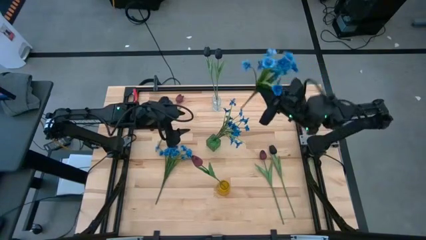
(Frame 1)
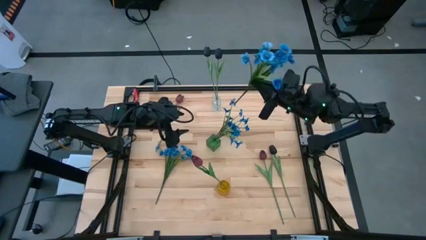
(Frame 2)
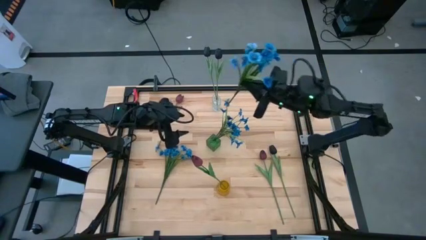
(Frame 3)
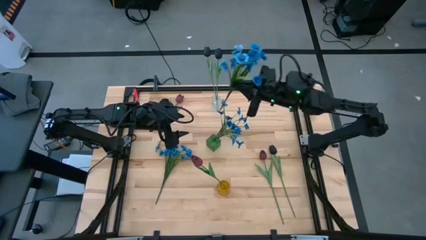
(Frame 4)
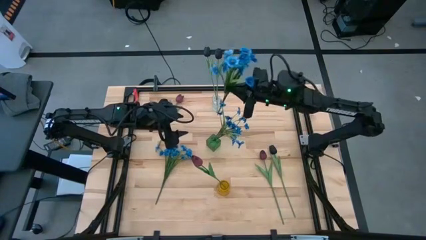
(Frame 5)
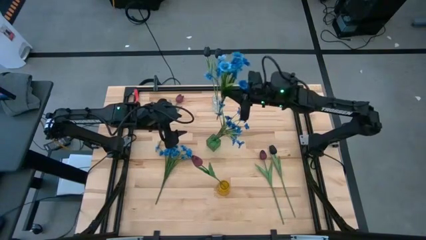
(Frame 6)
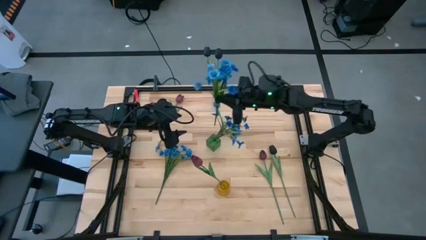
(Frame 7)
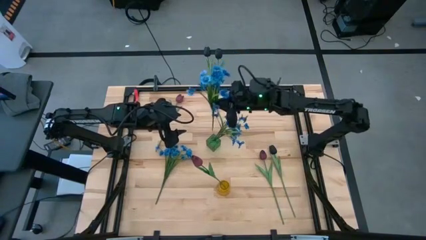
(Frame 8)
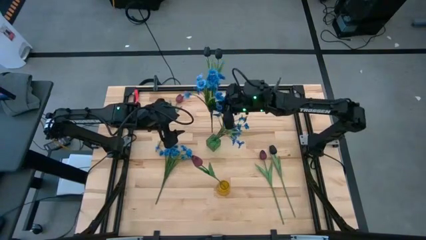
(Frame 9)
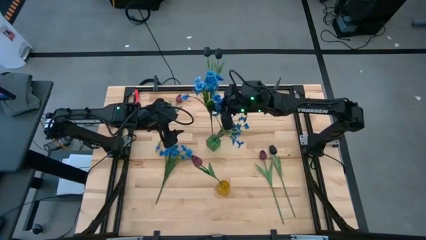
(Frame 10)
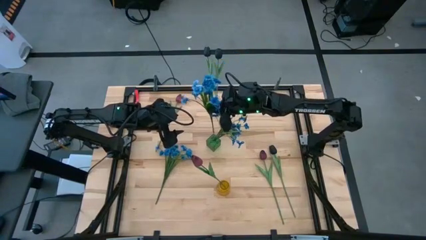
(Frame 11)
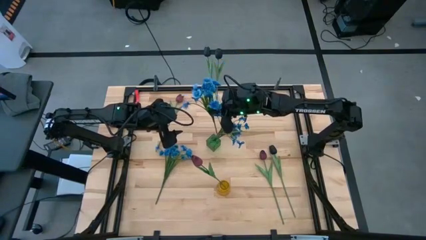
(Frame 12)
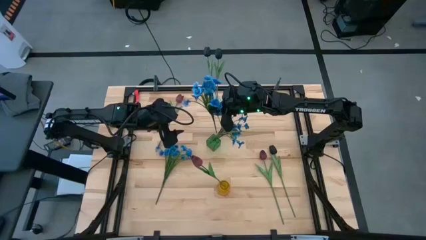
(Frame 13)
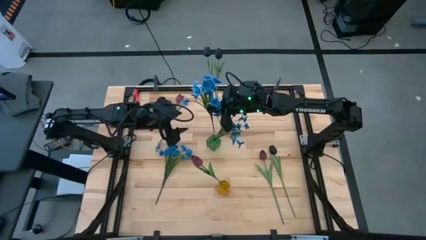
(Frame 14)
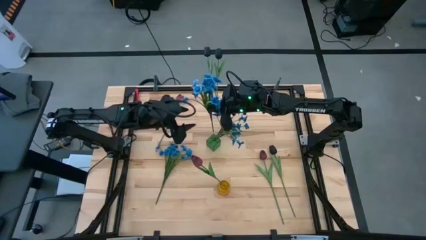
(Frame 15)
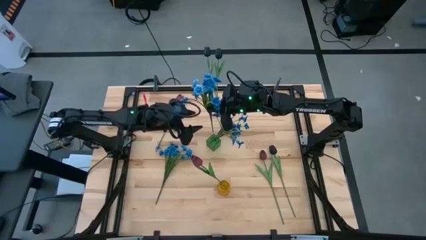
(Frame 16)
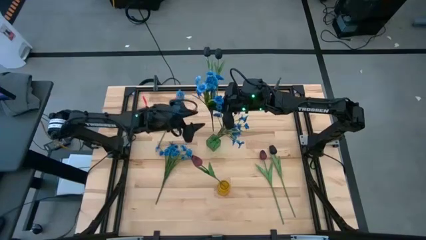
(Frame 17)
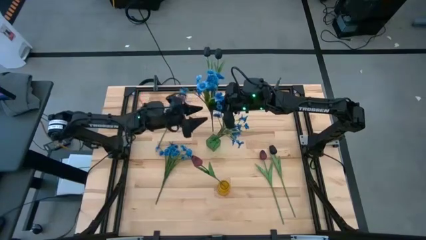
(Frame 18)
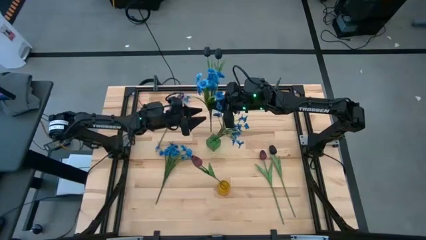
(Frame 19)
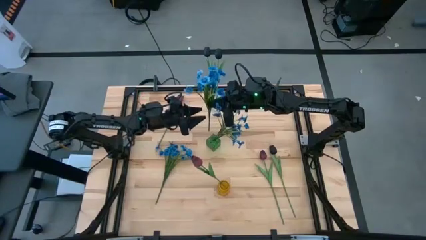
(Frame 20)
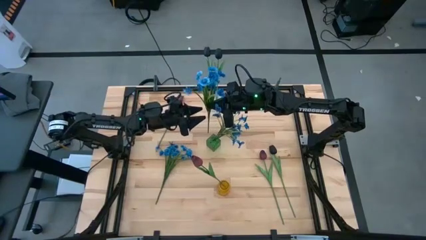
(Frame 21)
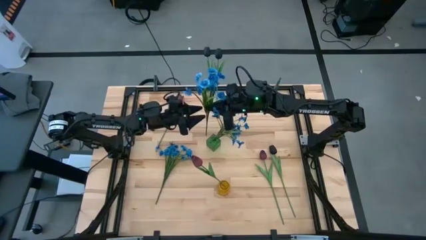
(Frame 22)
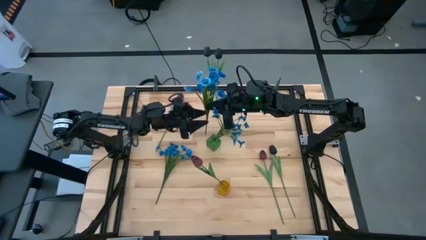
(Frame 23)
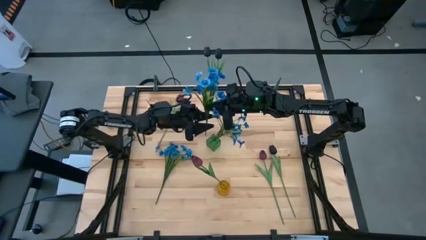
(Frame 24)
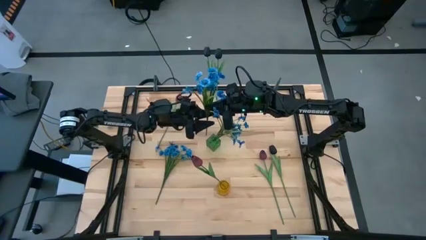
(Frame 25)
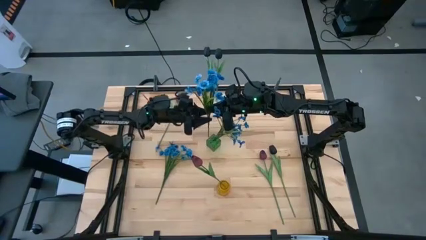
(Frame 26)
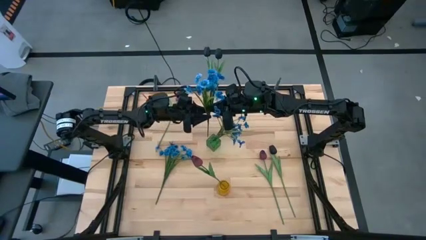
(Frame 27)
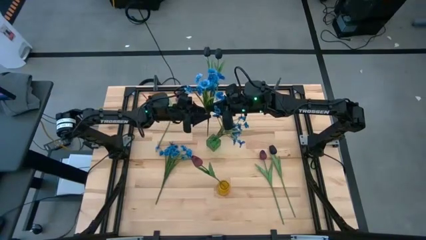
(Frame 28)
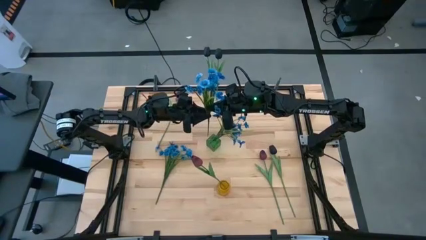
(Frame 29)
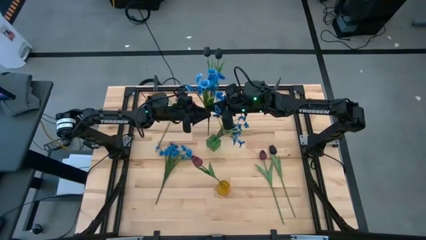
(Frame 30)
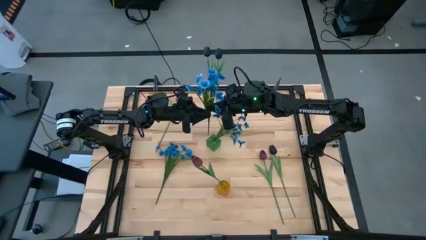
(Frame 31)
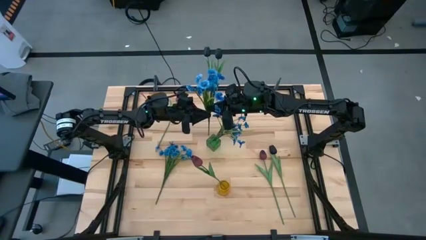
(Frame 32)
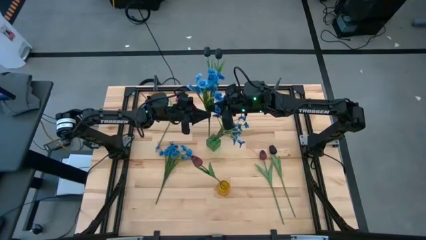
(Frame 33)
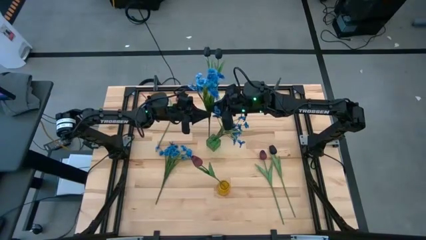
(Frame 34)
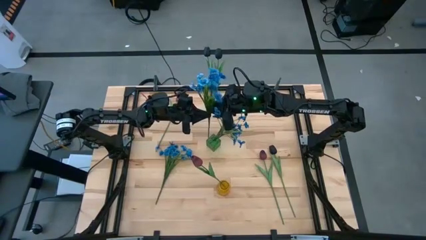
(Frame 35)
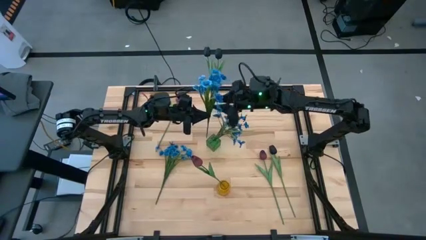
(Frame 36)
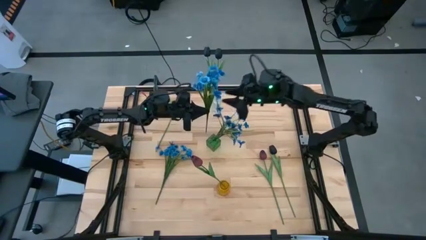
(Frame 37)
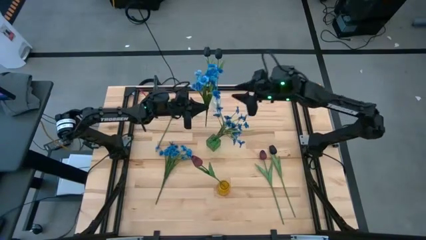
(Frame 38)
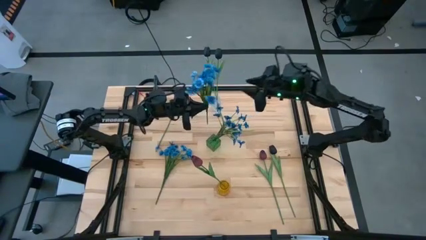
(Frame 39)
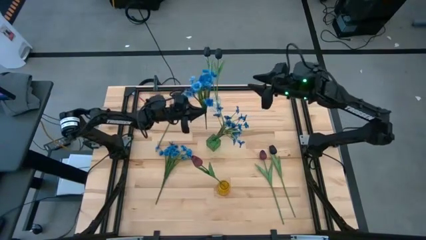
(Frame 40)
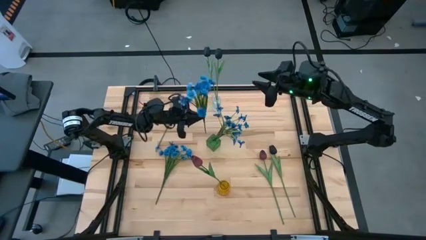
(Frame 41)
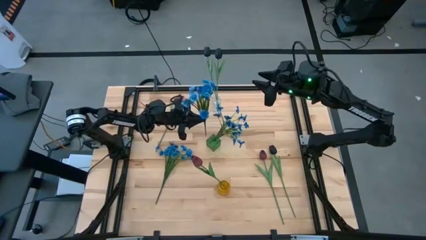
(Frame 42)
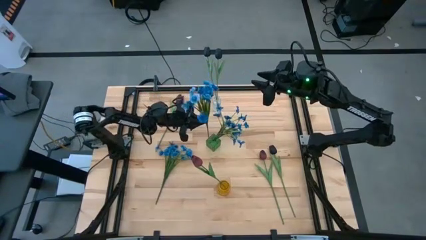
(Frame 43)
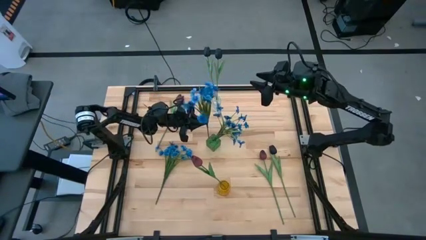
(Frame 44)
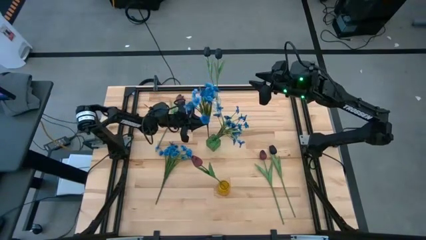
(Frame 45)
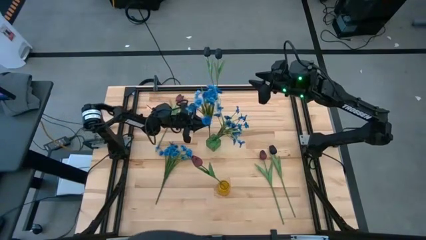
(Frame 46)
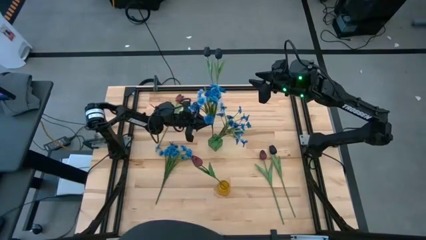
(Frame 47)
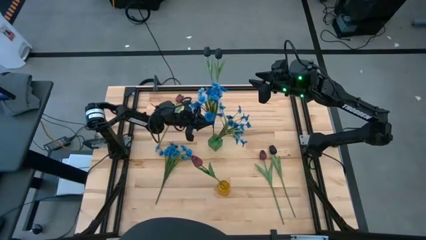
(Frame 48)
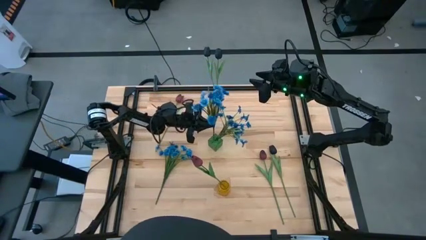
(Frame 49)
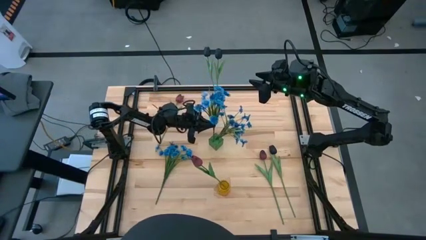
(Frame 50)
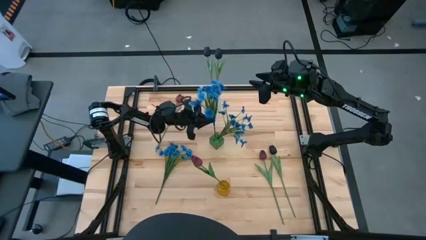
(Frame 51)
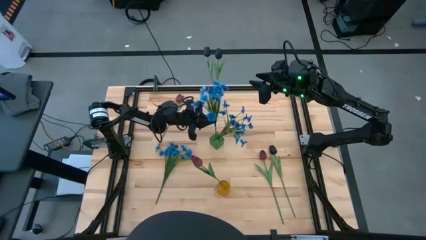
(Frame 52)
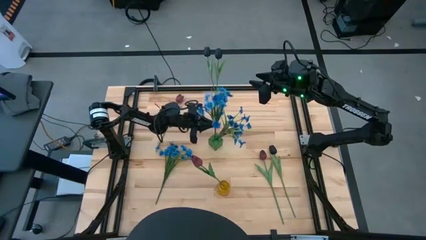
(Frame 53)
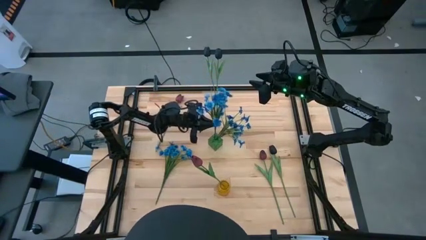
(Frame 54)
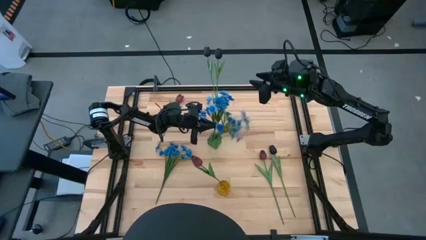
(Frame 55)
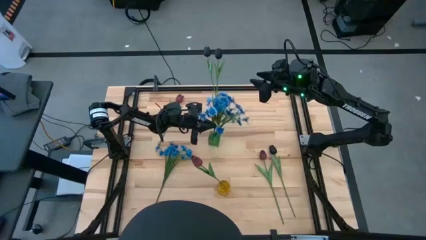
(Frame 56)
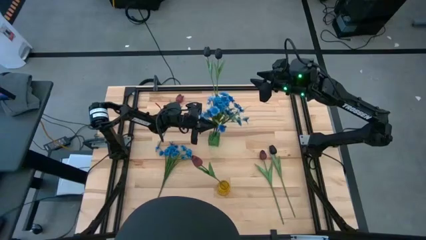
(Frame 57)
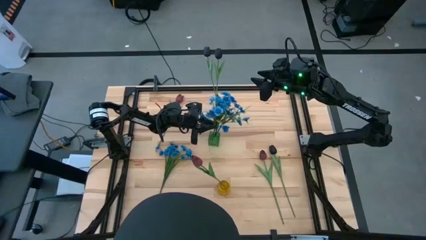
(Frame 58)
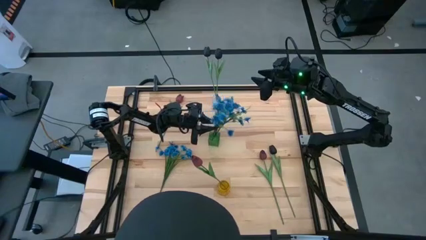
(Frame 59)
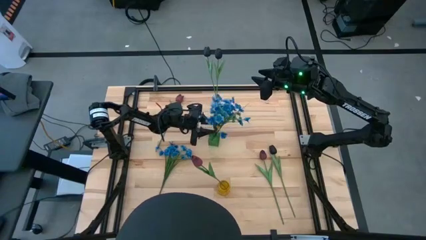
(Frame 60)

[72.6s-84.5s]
Task: Sort flowers into vase by color
Put the right blue flowers into the green vase
